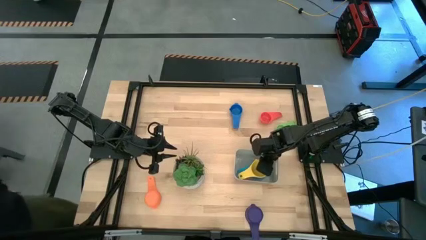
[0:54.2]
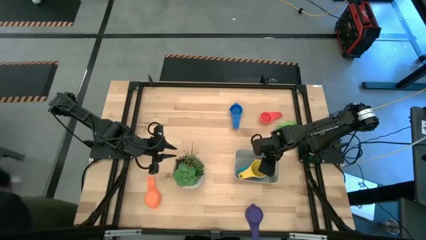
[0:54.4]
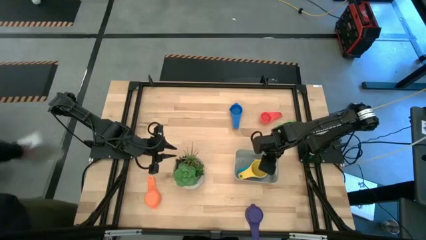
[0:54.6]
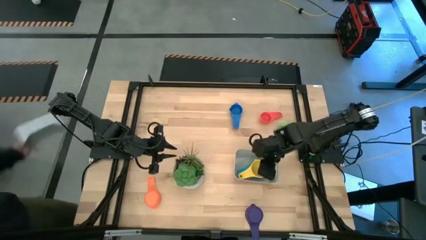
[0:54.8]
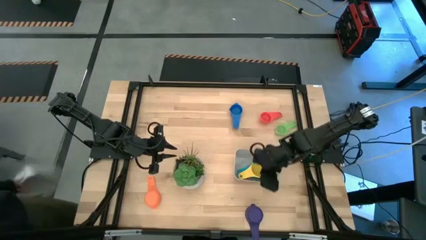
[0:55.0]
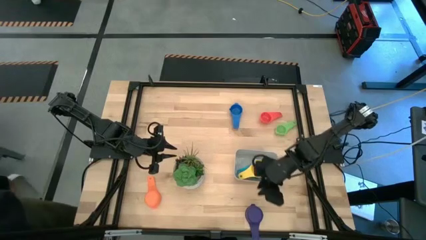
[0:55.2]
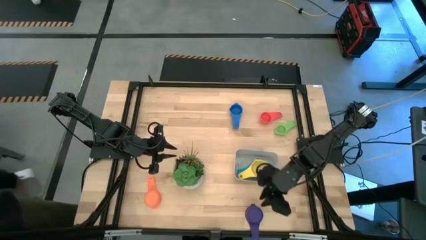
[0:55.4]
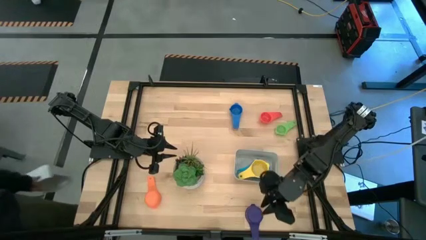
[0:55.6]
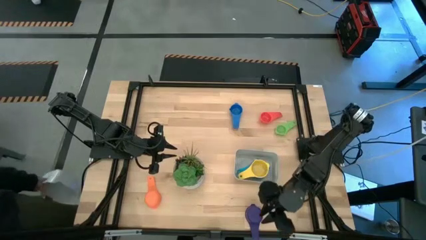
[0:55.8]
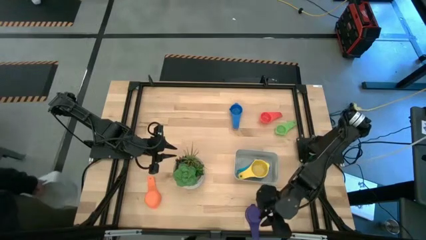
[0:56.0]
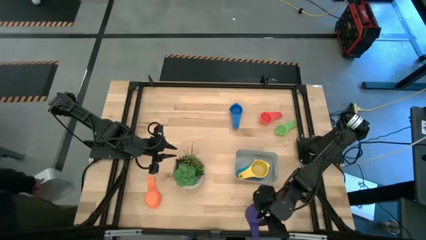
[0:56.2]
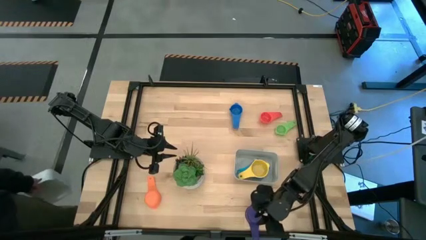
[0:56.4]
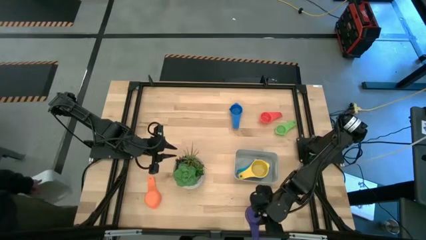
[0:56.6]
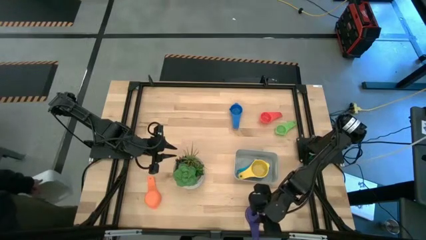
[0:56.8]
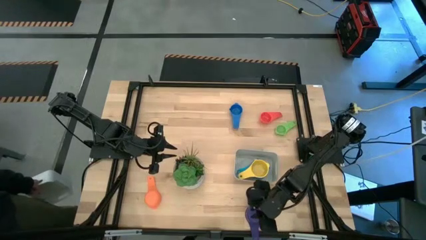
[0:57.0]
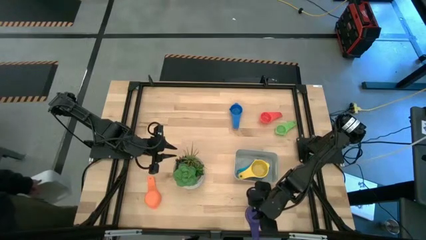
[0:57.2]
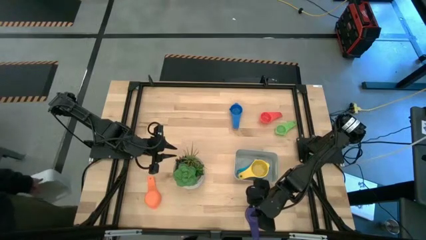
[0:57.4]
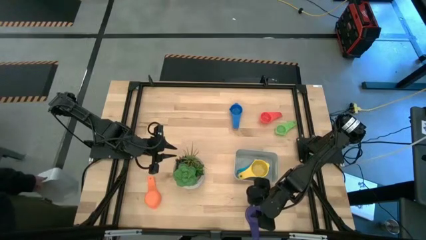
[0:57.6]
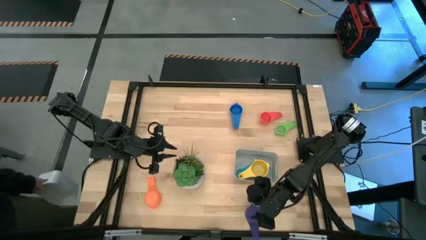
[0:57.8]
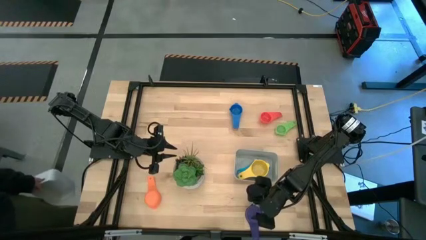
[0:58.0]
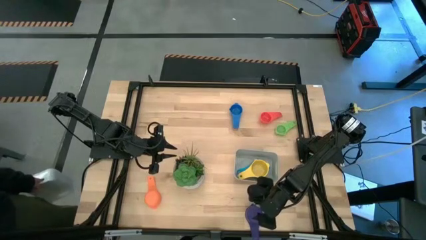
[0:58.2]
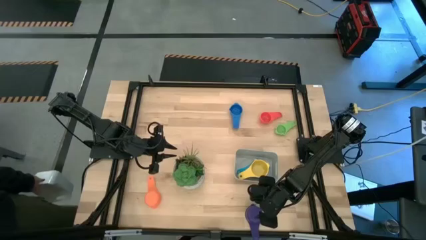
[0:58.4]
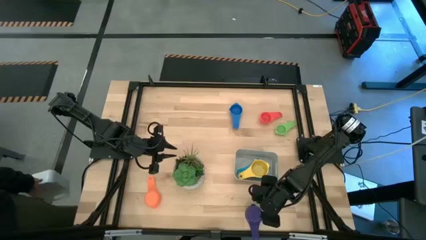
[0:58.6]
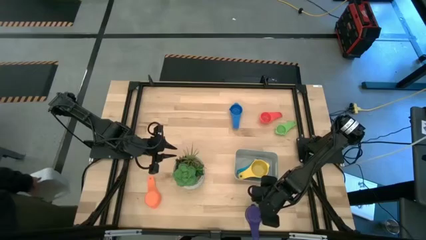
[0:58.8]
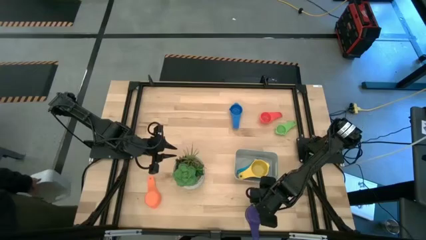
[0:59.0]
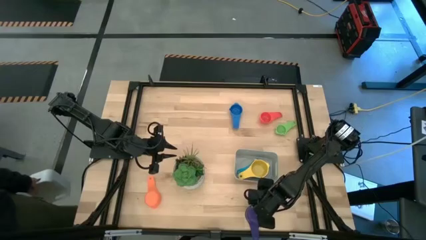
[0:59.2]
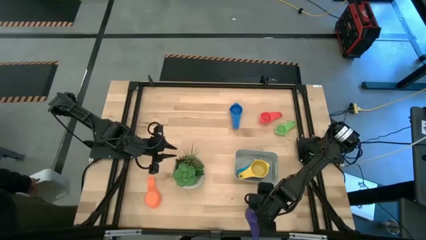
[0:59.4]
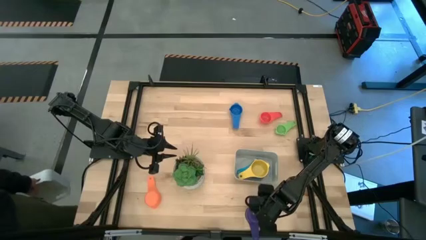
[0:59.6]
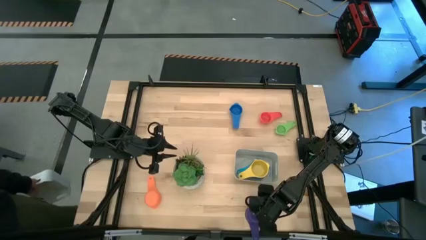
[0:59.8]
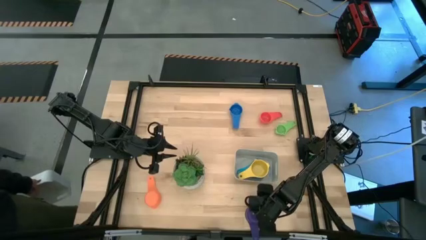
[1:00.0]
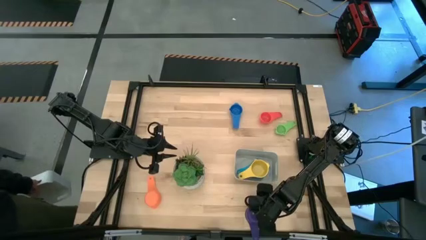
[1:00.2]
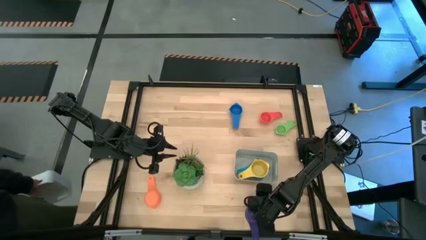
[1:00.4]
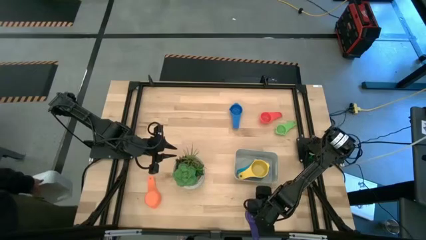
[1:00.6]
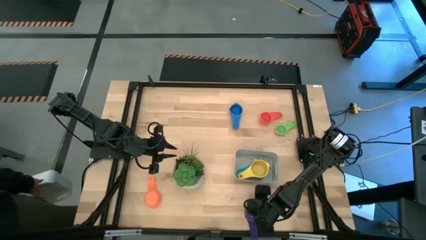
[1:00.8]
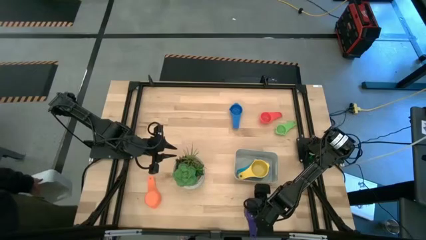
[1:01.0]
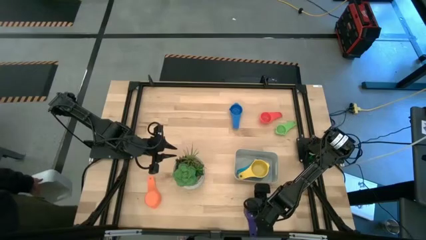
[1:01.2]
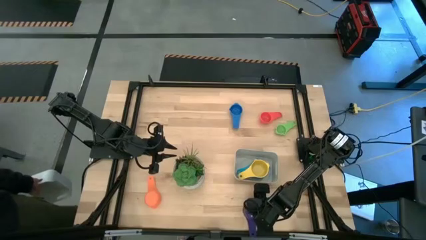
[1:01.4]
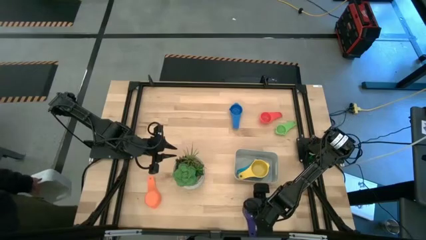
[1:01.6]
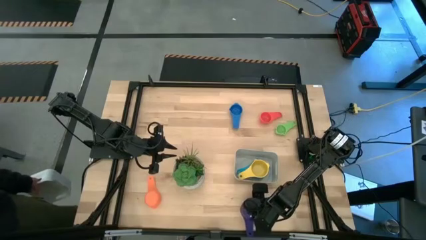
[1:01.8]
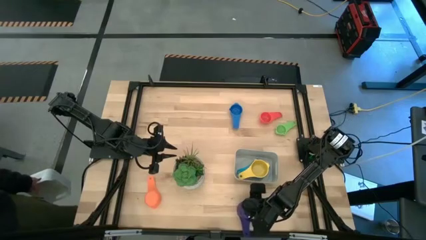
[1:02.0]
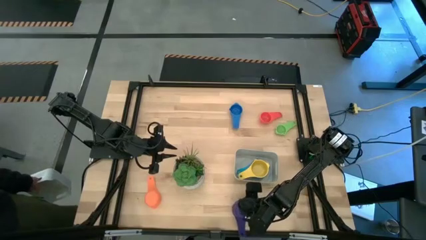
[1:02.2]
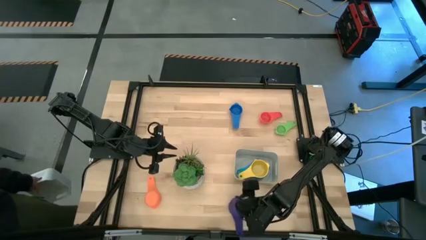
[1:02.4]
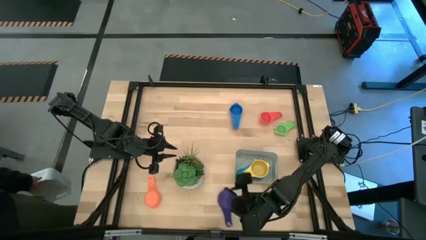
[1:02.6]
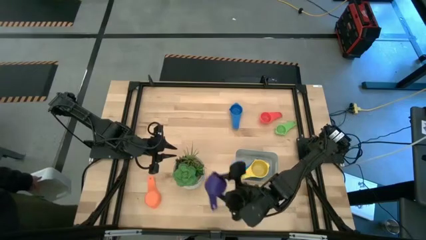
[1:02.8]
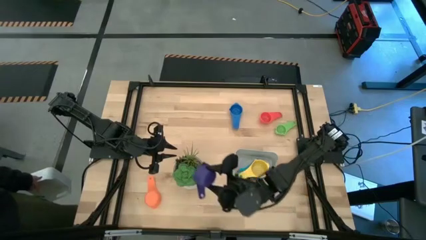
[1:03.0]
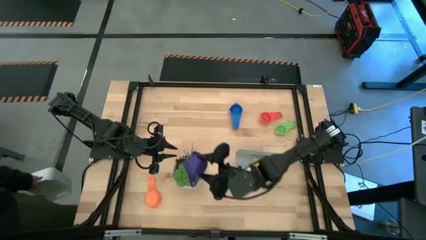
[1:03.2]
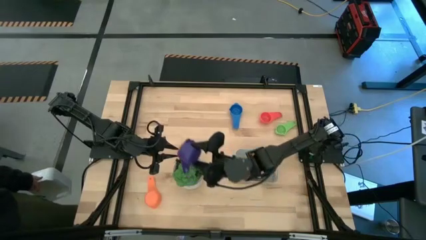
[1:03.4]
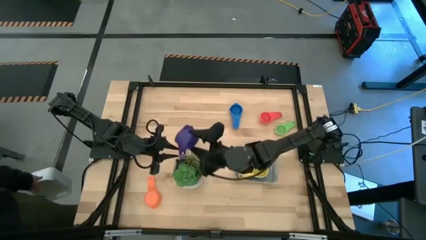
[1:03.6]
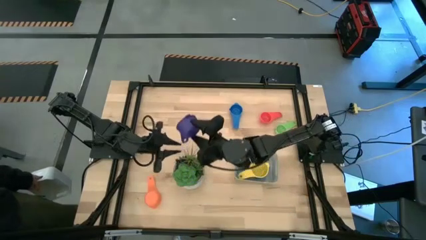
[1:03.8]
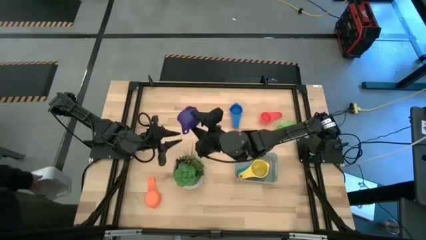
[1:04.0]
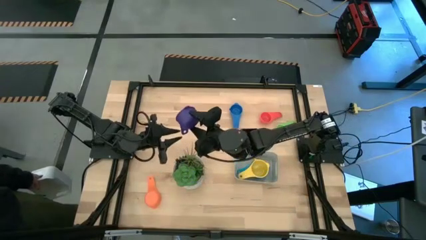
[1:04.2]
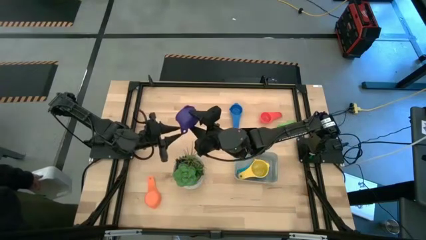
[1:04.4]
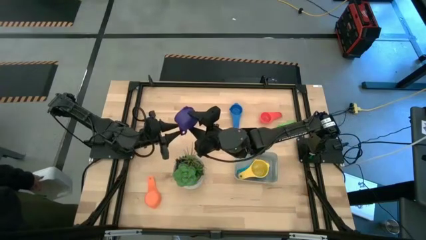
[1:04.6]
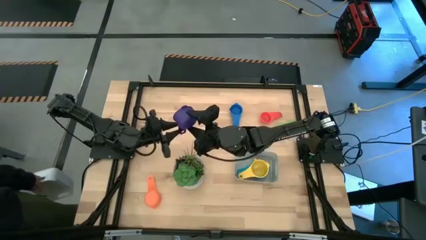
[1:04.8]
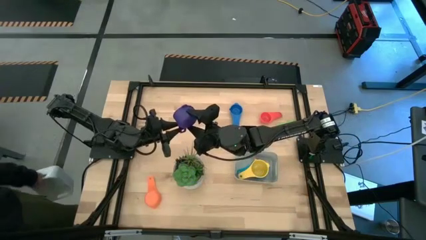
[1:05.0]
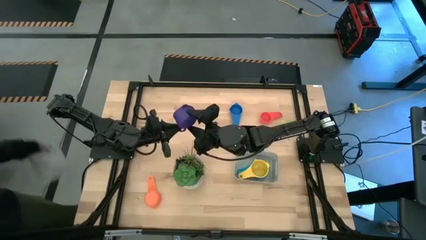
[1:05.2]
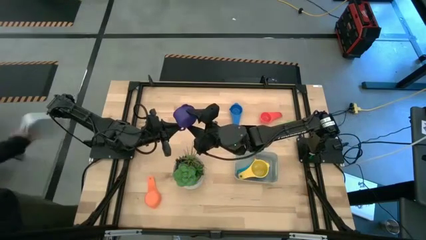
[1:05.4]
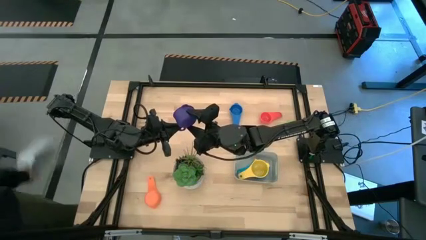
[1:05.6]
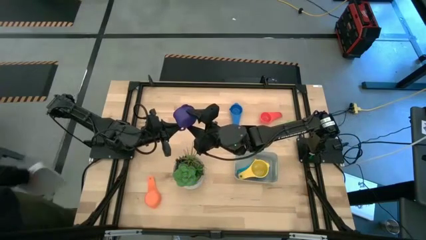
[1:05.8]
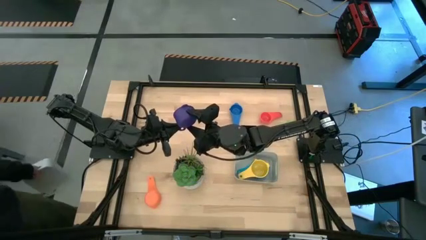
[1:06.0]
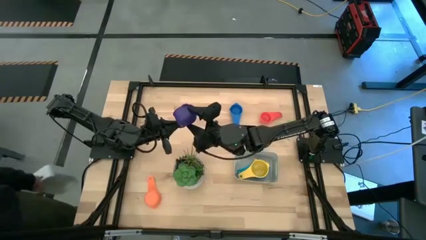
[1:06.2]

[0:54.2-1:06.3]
Task: Nest measuring cups in basket
Stack the violet measuring cup on top of the yellow measuring cup in the grey bin
